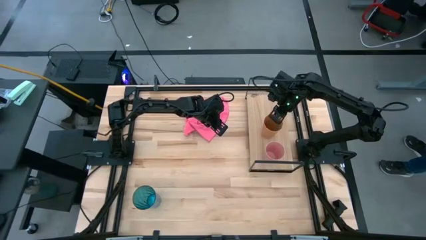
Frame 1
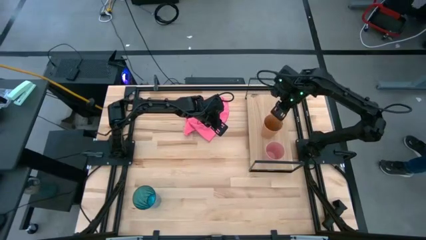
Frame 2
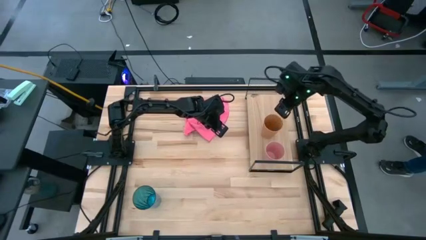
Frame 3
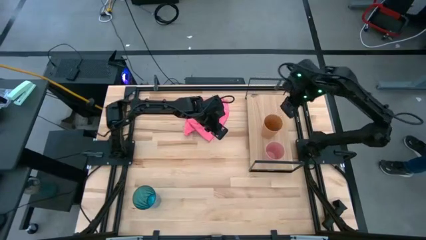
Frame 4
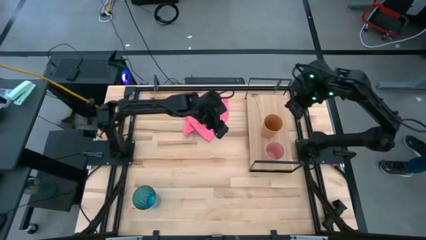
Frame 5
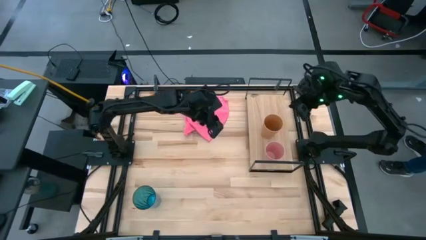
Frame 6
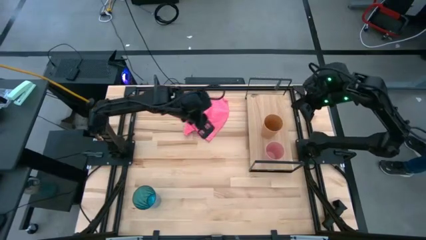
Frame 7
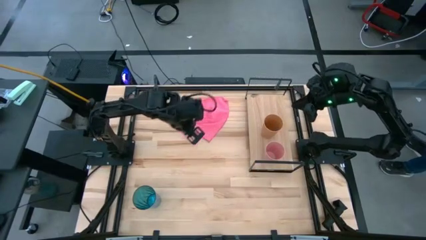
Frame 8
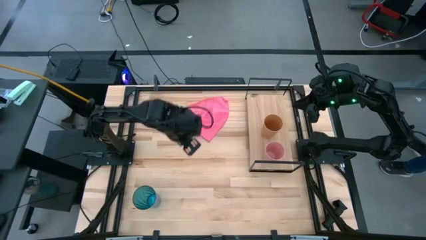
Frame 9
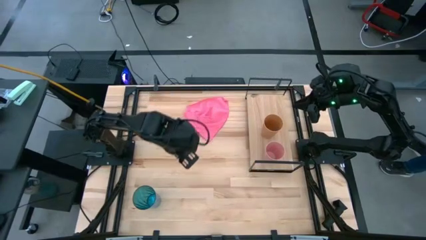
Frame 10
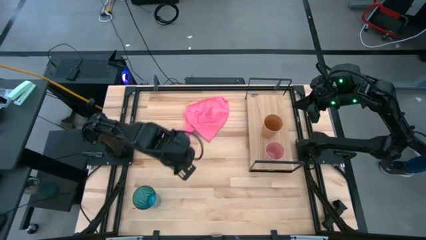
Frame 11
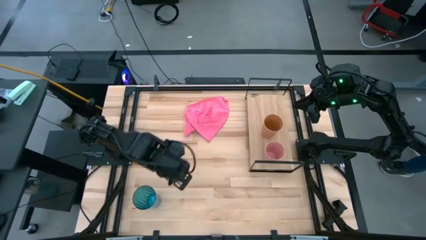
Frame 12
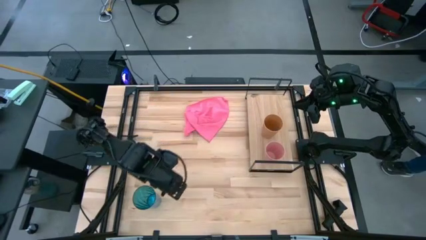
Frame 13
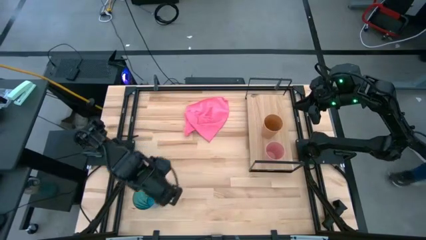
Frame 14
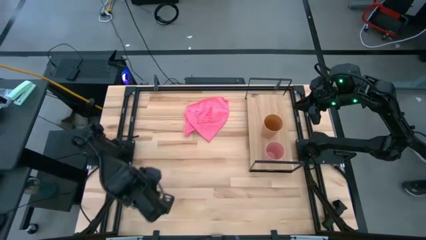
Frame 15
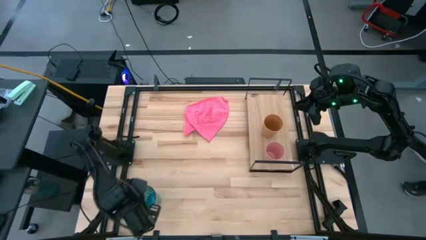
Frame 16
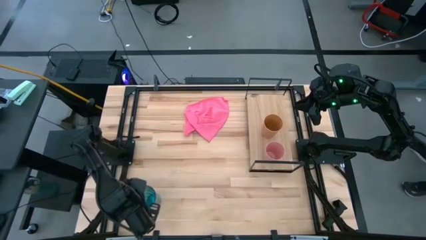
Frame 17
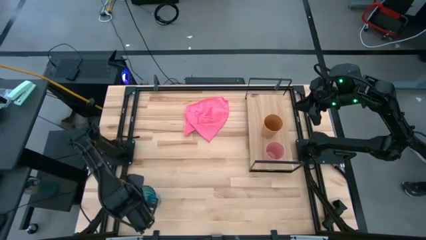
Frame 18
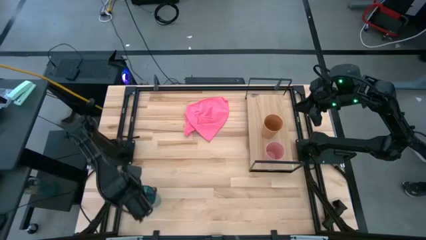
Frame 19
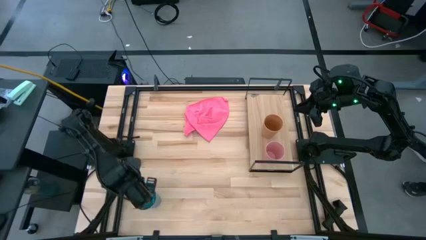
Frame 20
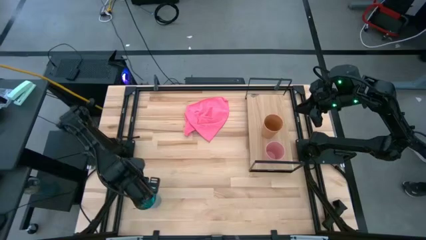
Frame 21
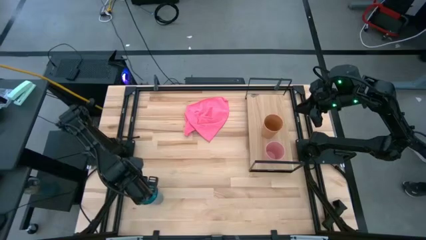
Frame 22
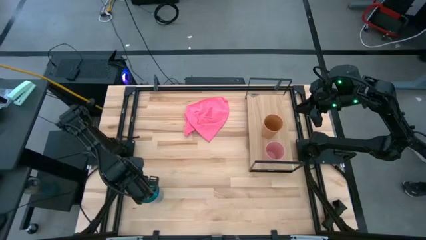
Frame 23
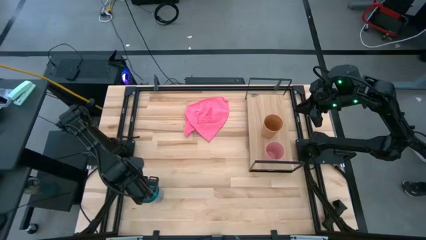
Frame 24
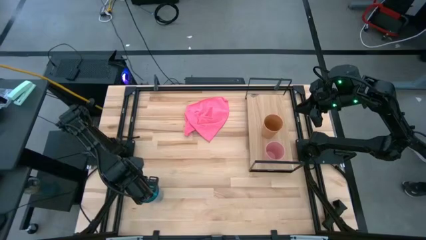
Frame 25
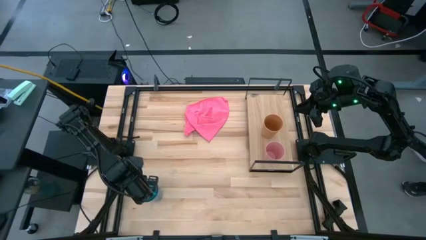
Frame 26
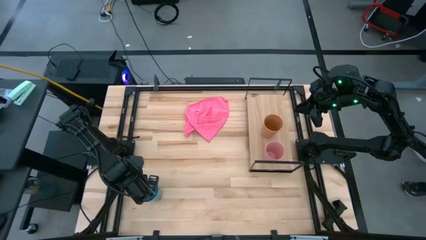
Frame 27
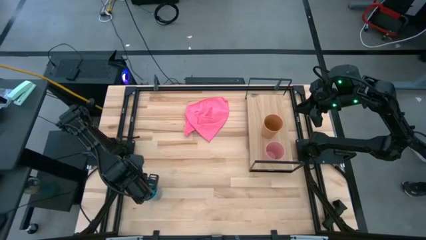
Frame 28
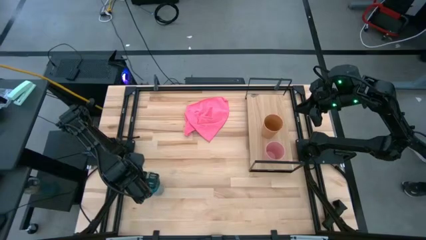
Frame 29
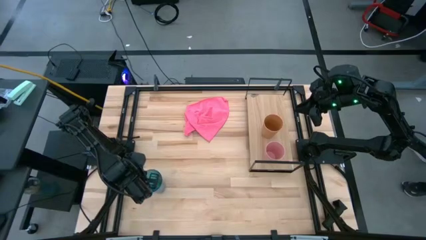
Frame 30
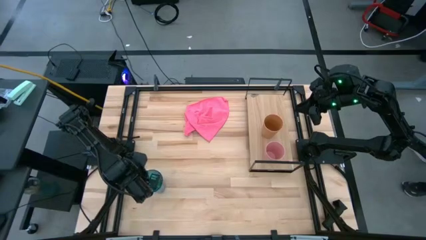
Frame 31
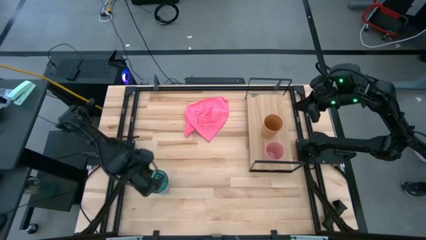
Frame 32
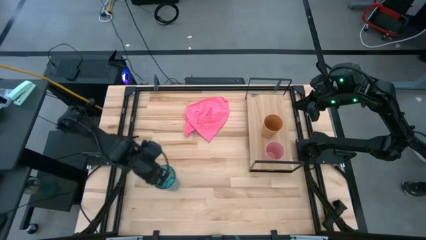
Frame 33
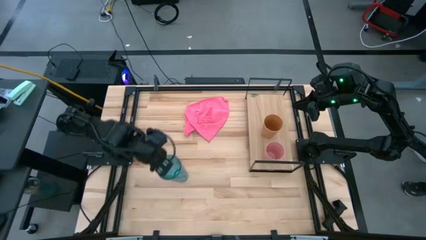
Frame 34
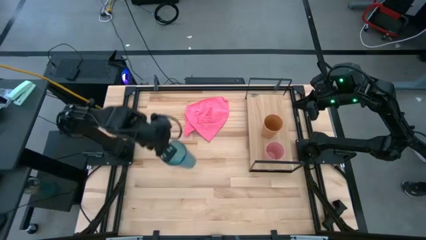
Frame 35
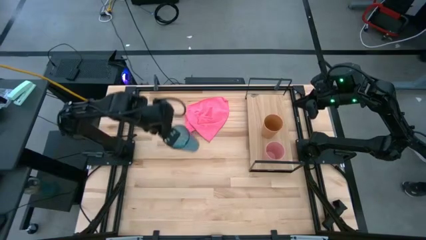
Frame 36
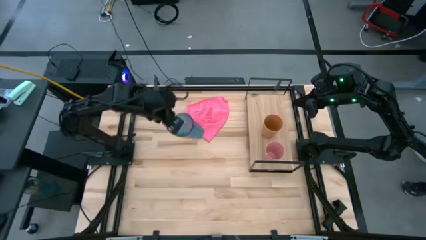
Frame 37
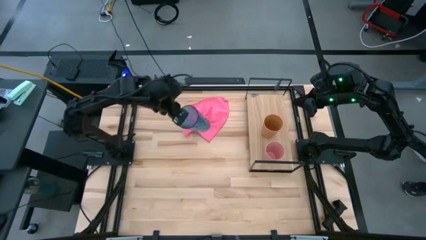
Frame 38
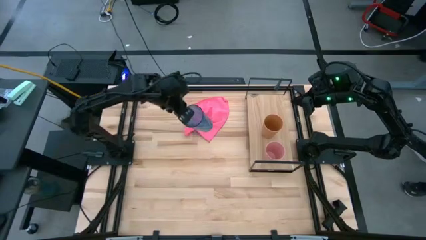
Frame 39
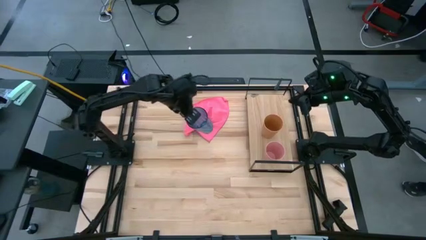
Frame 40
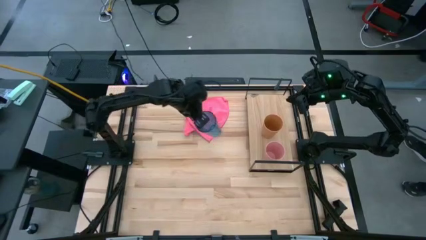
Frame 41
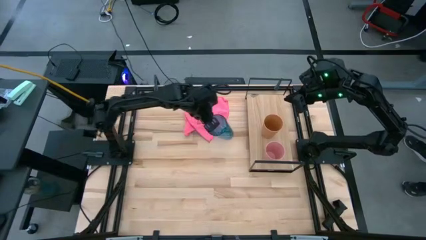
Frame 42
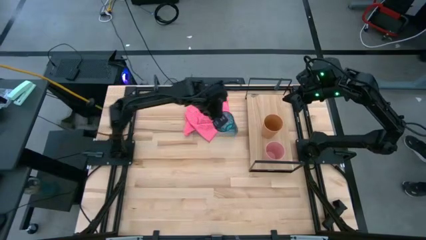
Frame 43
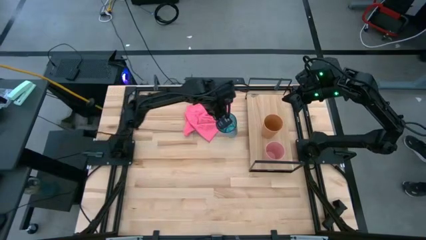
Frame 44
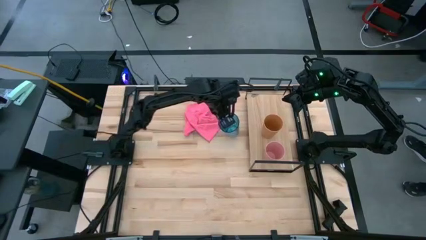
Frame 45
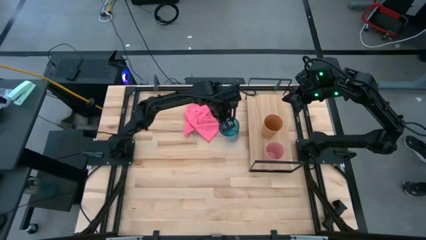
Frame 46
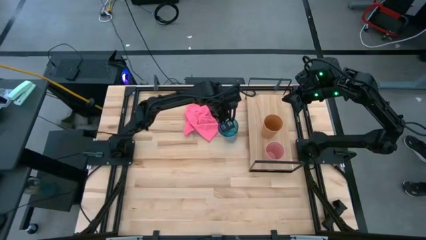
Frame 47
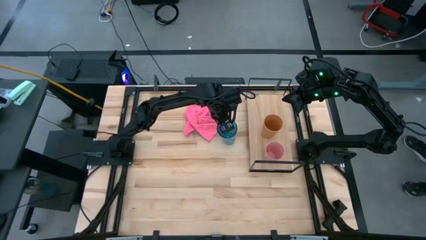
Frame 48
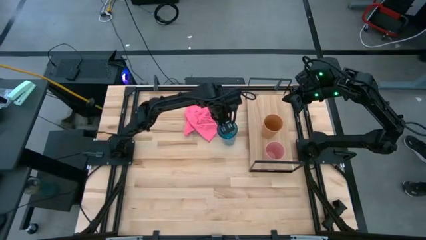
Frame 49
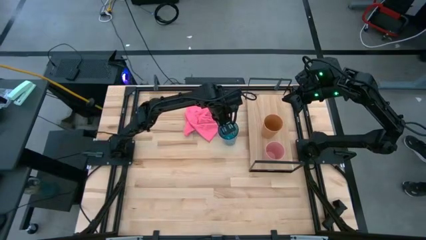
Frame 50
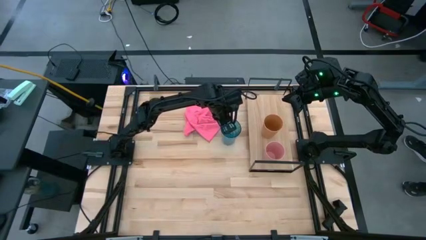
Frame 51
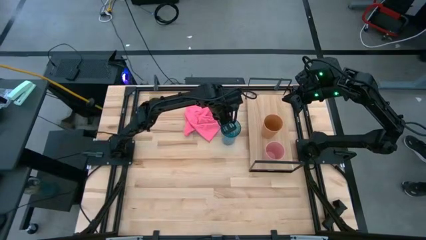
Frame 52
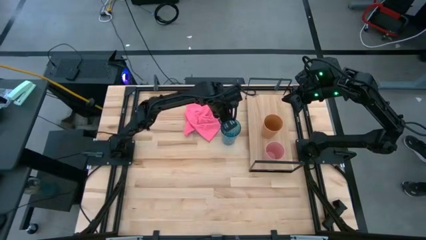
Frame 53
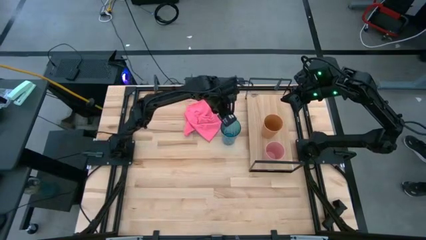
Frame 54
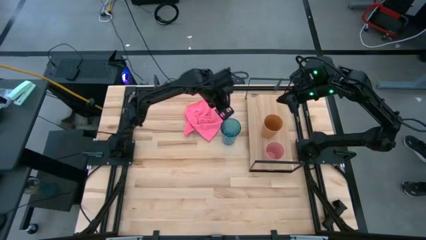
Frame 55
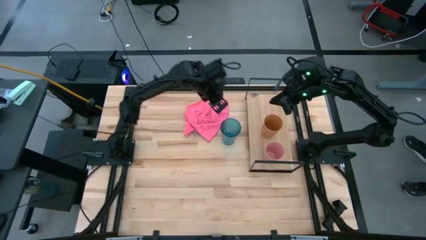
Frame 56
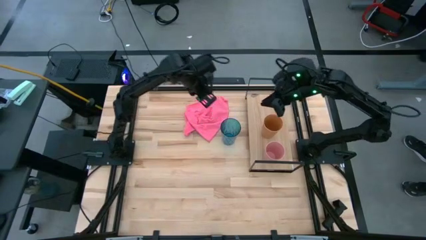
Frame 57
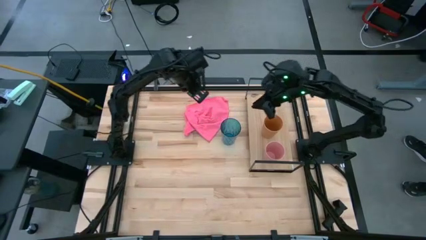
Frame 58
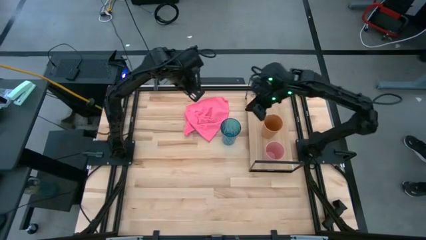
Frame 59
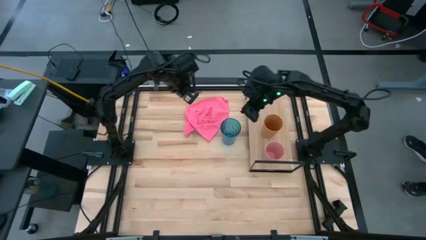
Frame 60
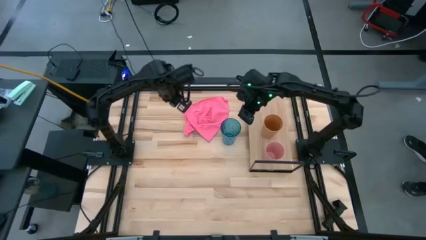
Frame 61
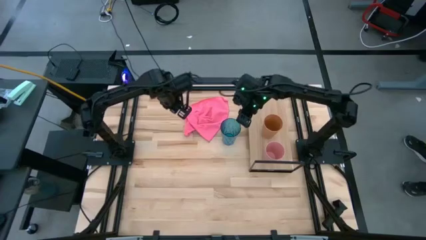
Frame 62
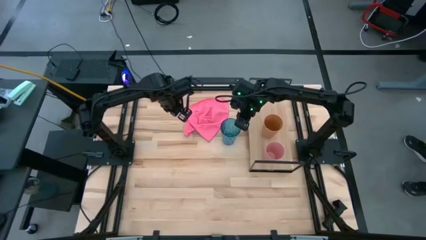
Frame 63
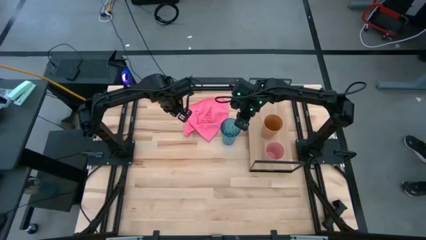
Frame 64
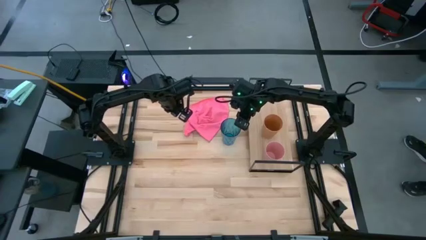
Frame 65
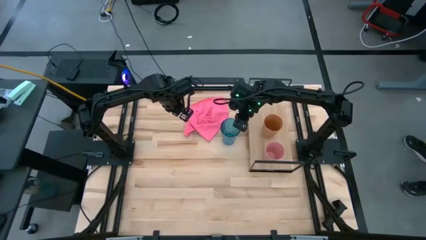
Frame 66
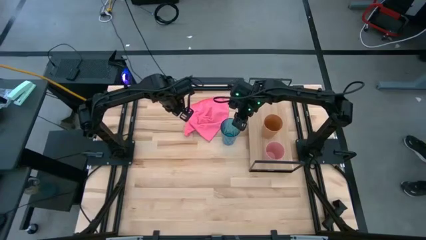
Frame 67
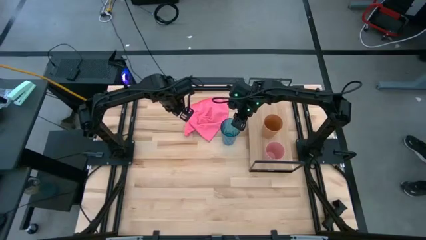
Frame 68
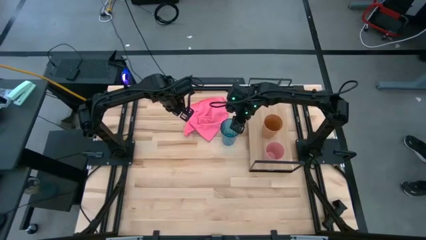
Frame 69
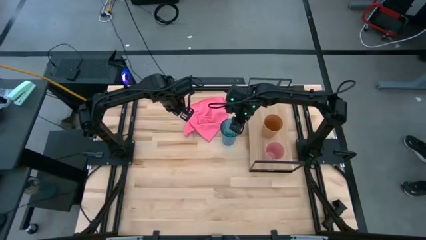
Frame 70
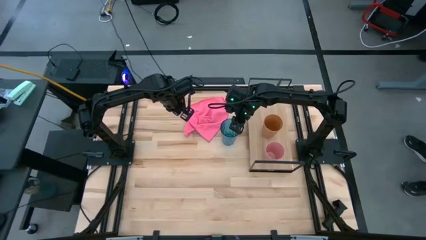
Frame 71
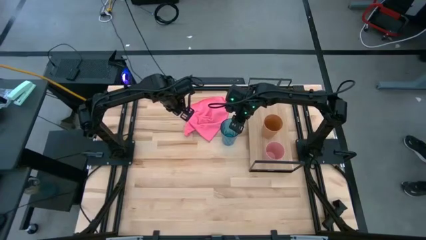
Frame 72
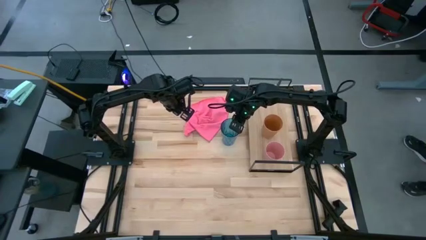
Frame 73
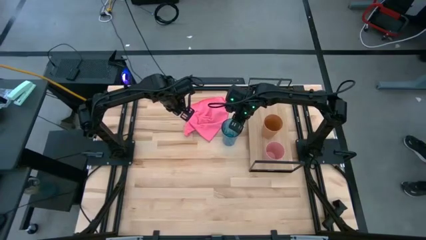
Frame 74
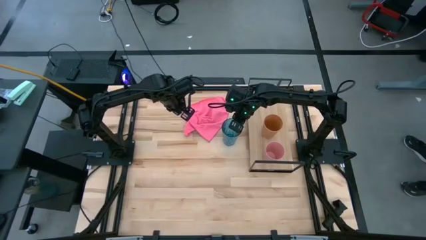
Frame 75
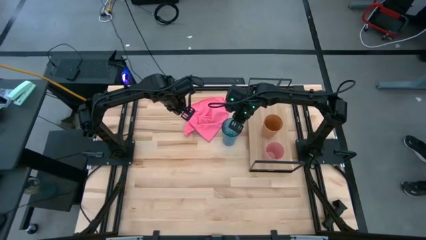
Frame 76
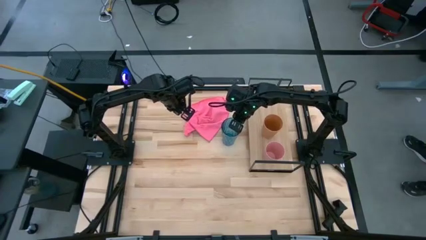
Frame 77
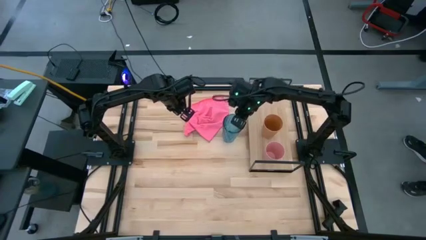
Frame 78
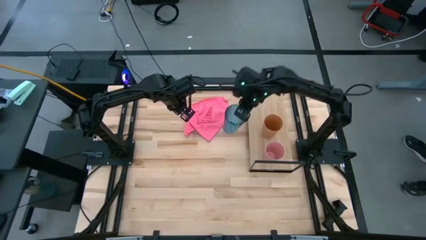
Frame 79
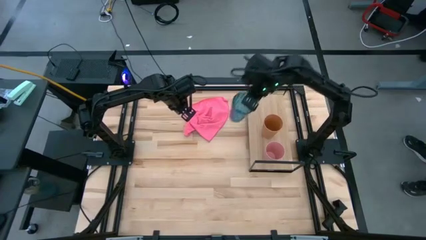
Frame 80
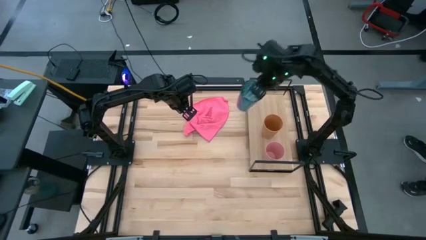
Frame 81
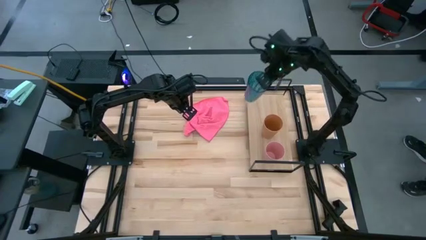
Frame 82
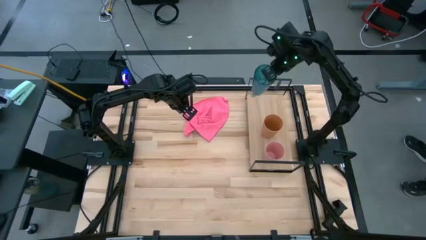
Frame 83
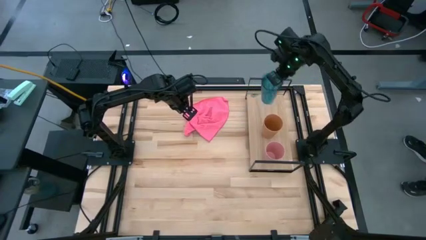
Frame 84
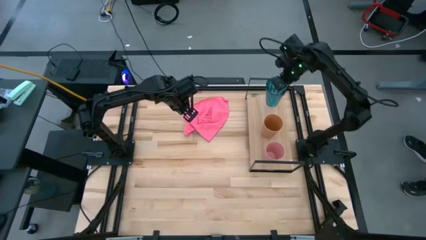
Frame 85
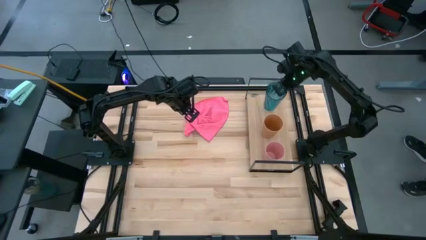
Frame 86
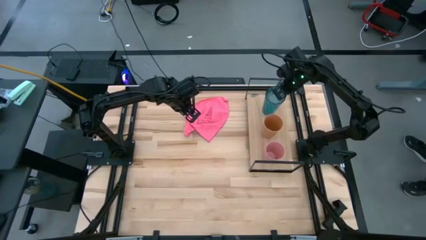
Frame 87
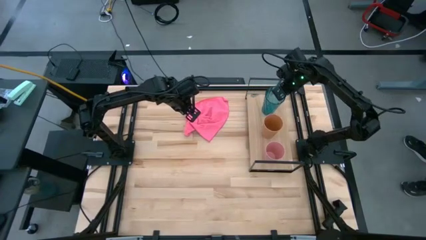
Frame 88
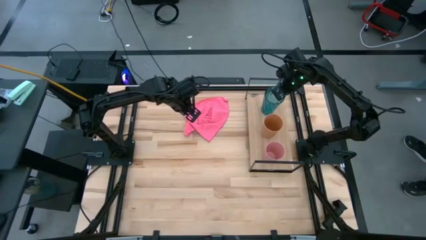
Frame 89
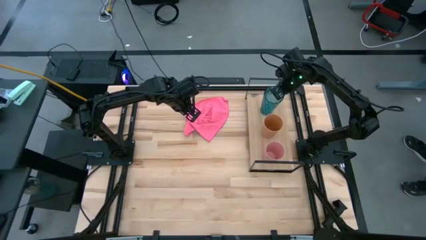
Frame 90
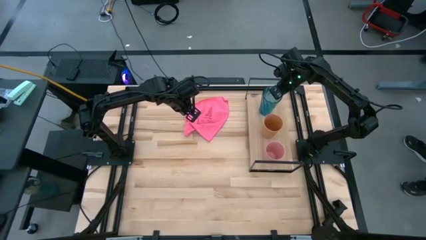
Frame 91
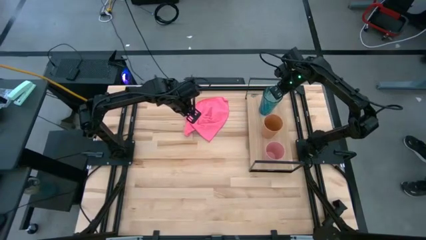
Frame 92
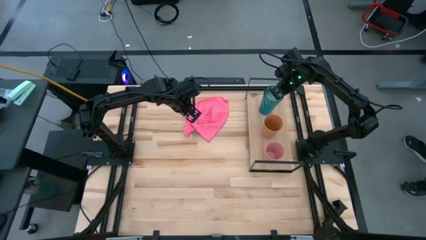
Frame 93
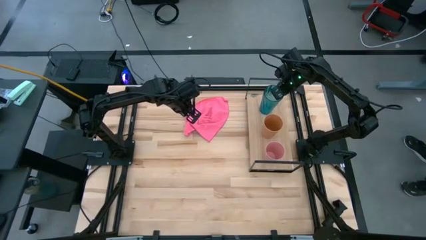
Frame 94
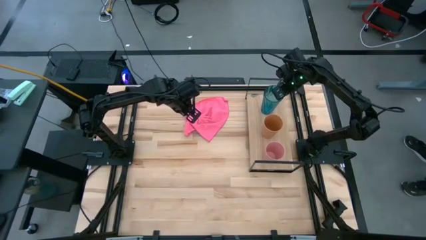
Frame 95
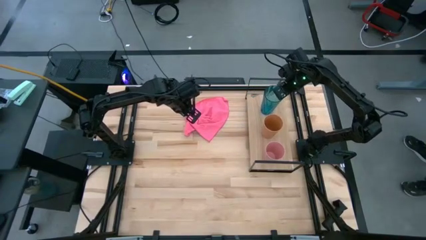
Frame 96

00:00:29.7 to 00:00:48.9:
Task: Stack small to large cups/mugs on shelf
Put the blue cup on the shelf
